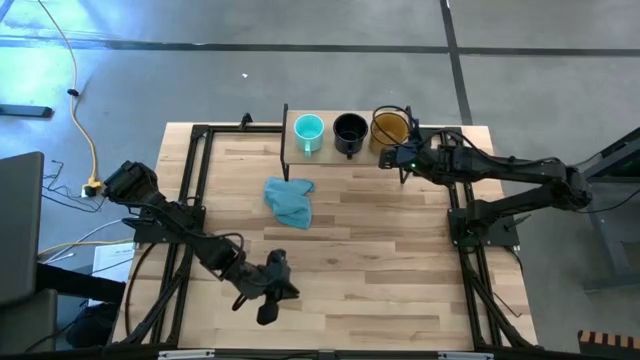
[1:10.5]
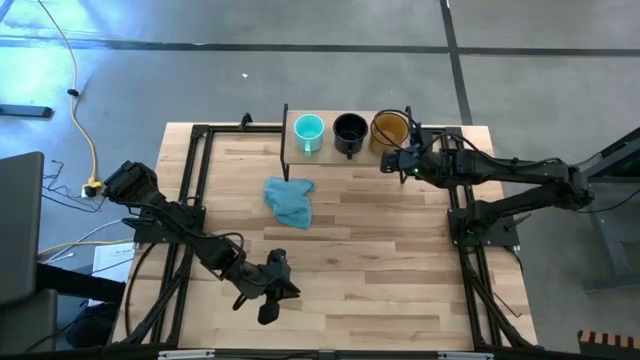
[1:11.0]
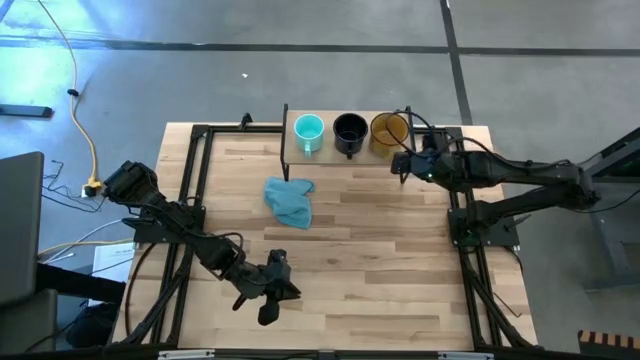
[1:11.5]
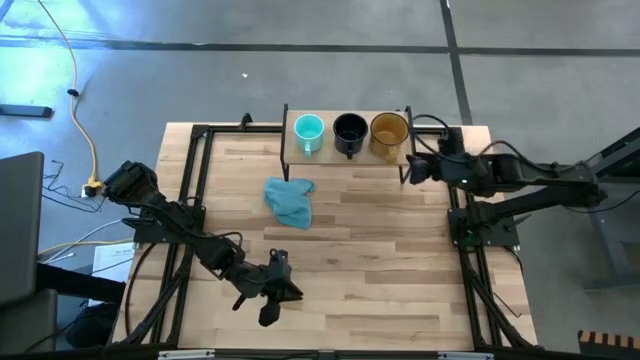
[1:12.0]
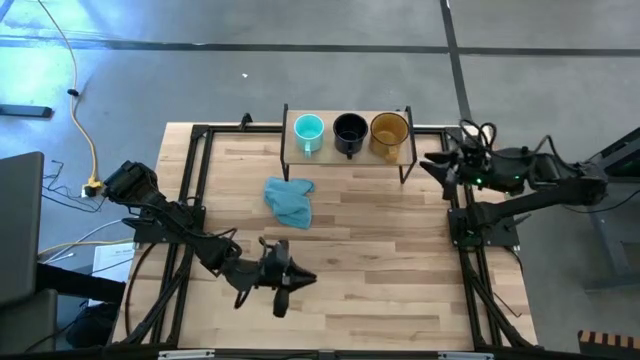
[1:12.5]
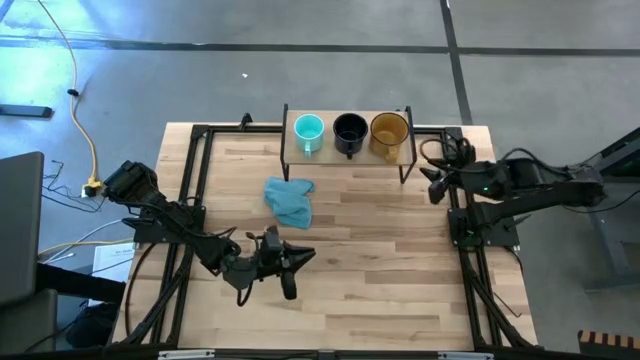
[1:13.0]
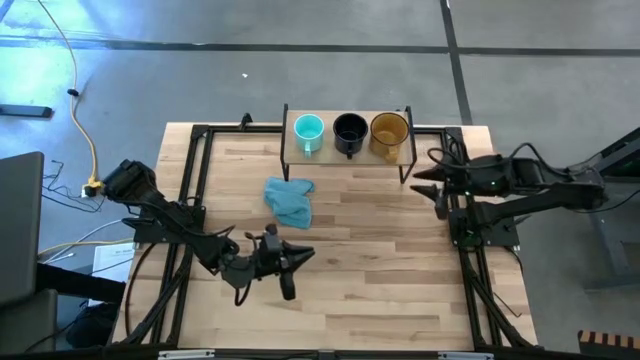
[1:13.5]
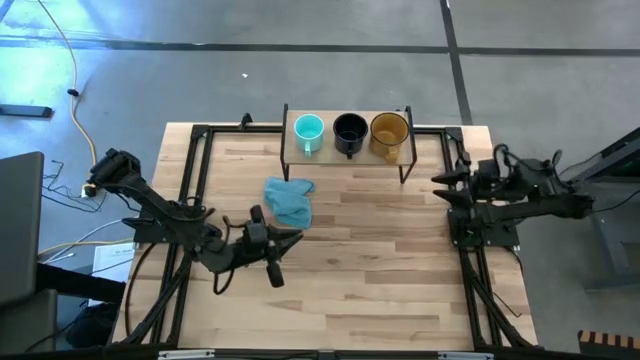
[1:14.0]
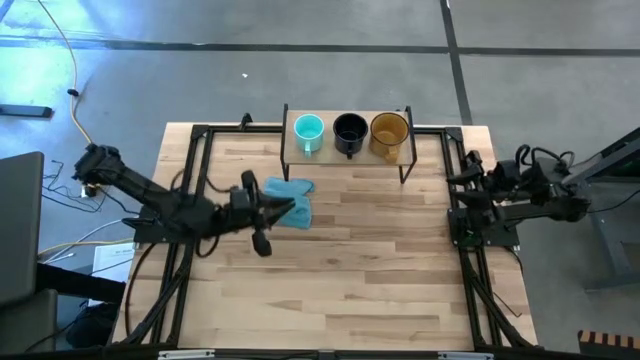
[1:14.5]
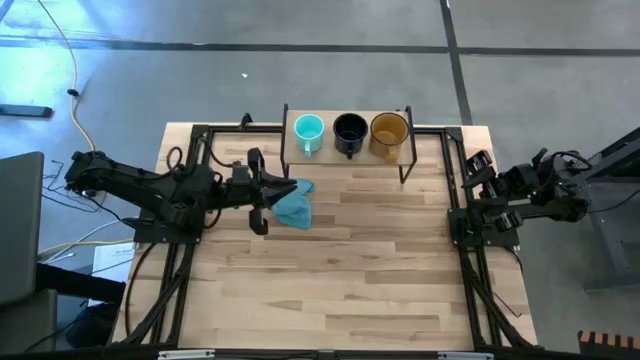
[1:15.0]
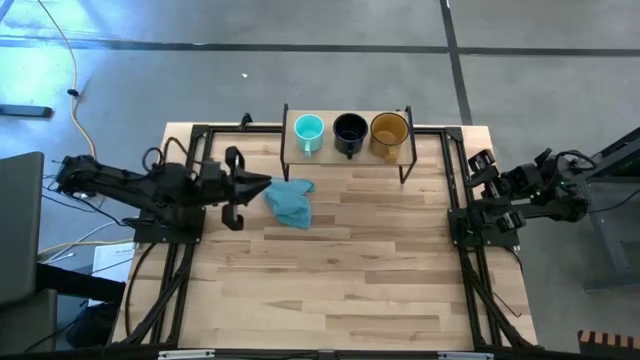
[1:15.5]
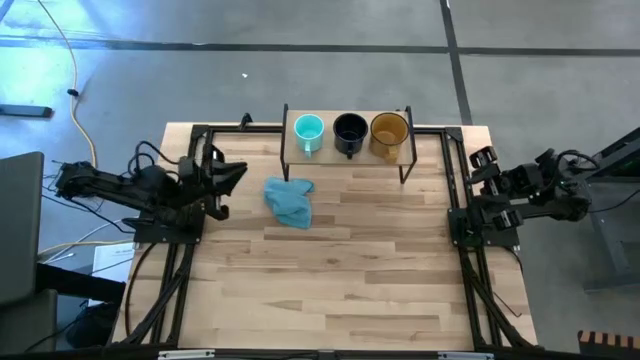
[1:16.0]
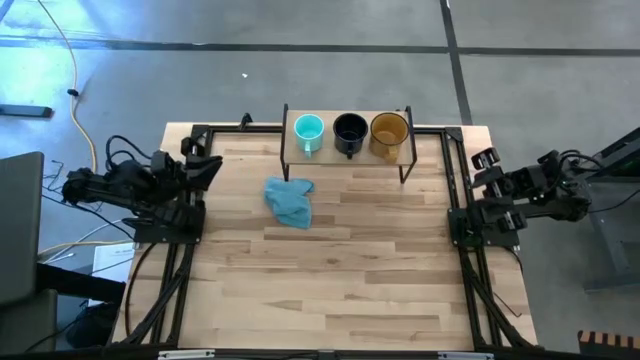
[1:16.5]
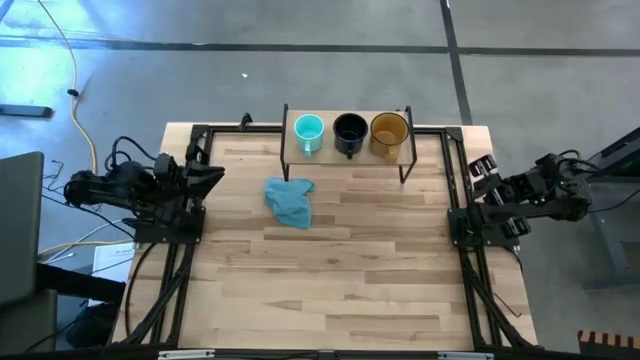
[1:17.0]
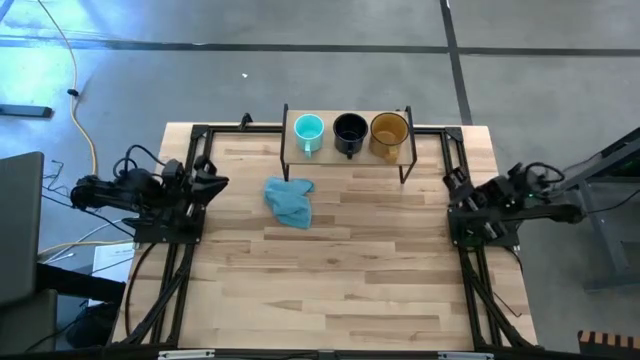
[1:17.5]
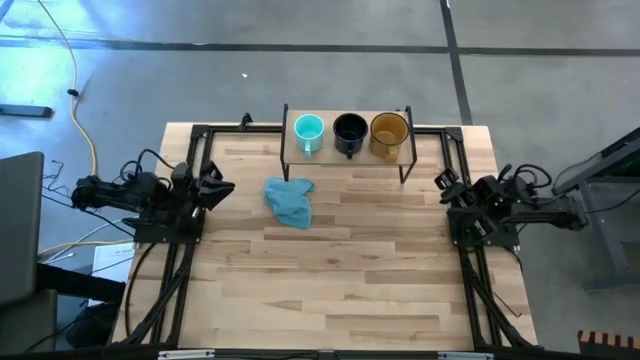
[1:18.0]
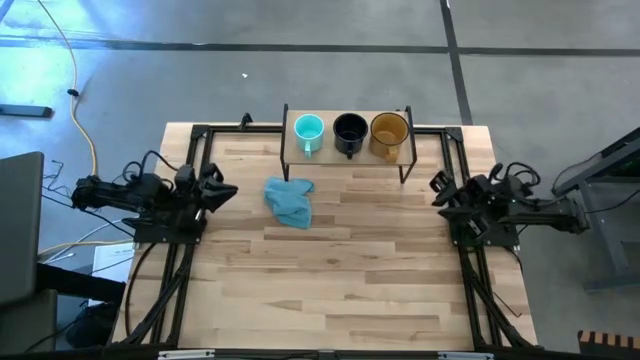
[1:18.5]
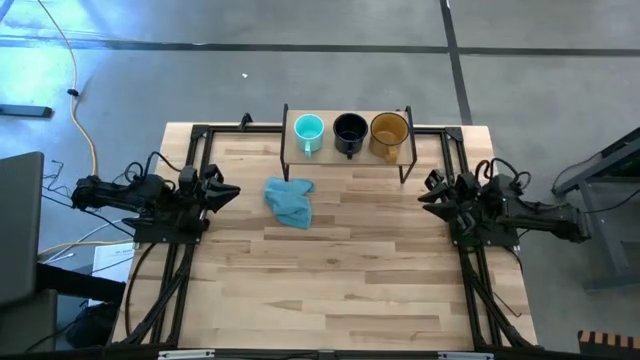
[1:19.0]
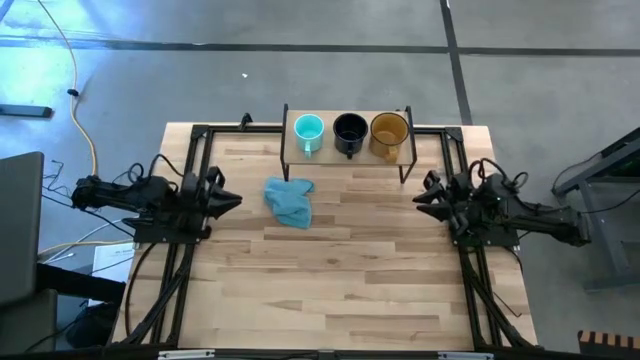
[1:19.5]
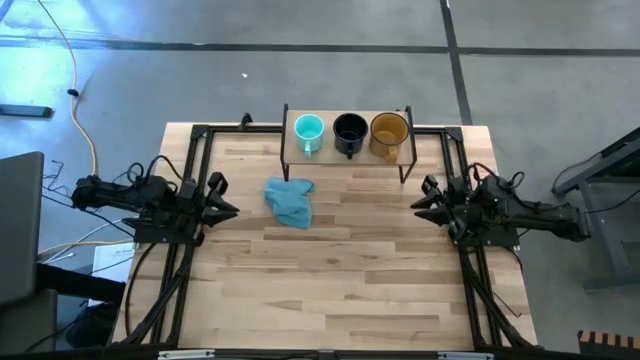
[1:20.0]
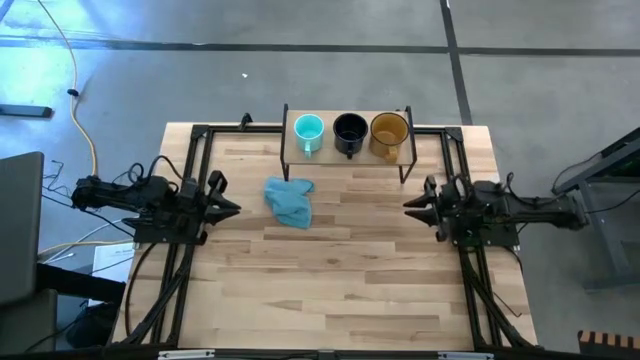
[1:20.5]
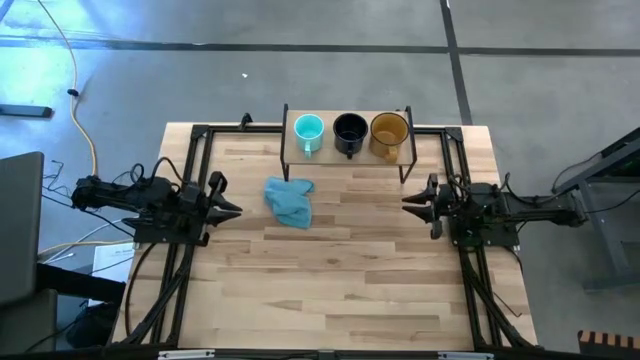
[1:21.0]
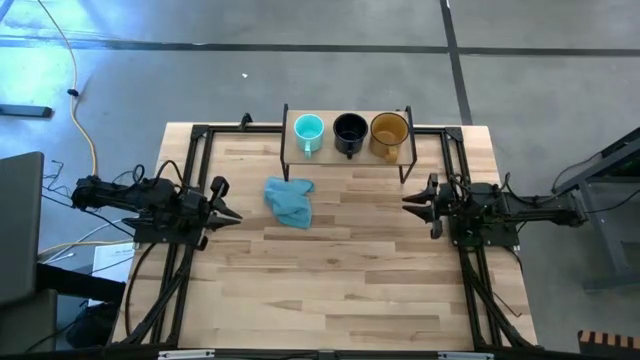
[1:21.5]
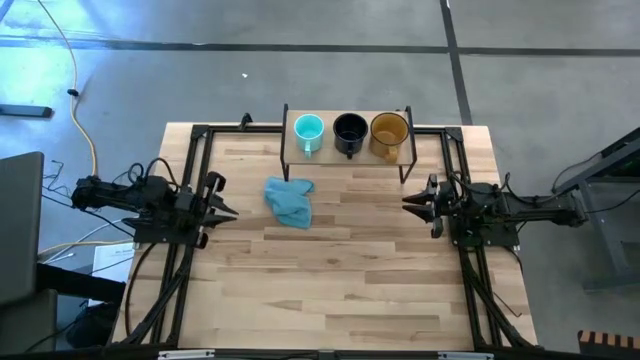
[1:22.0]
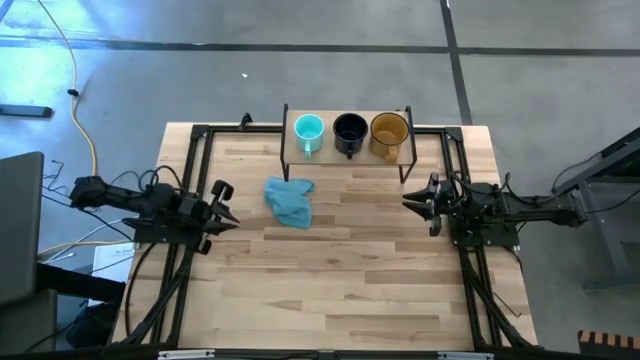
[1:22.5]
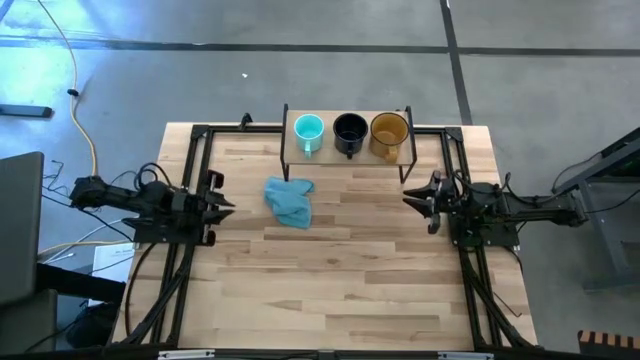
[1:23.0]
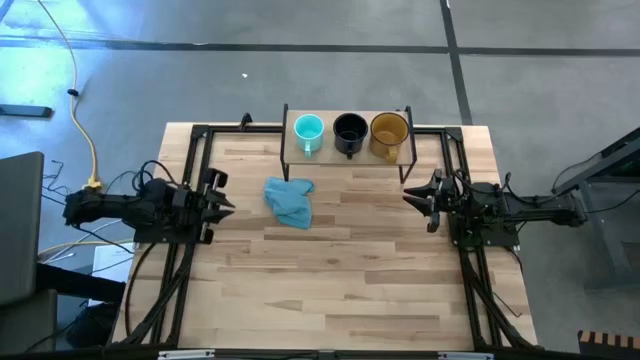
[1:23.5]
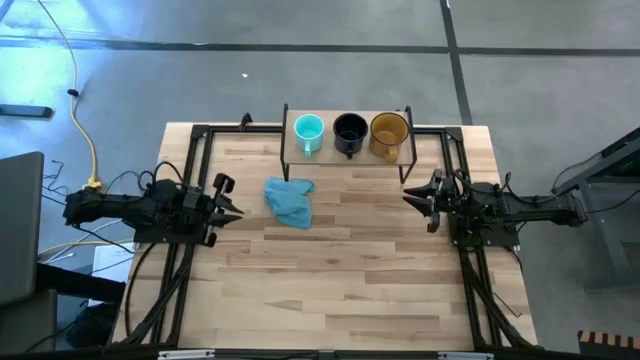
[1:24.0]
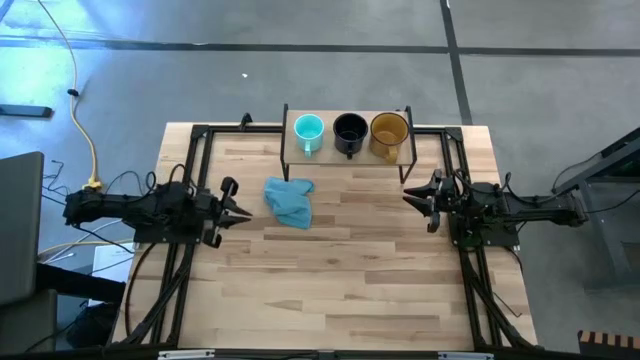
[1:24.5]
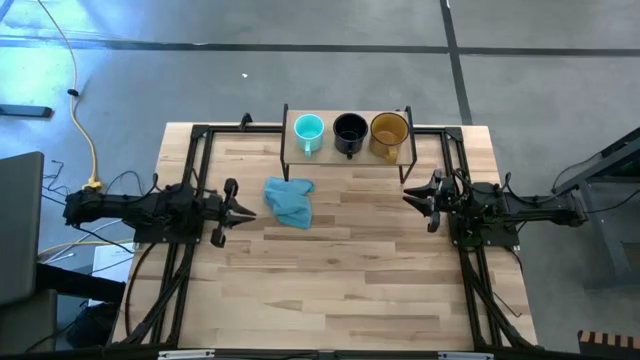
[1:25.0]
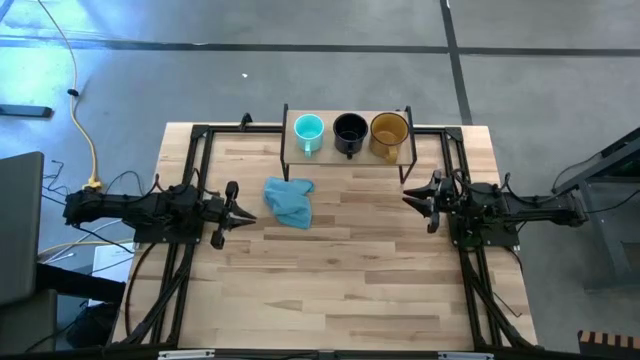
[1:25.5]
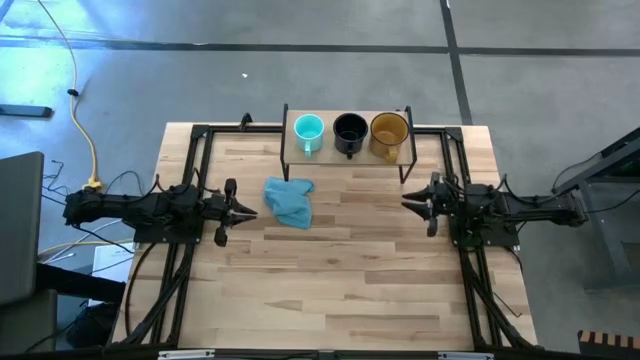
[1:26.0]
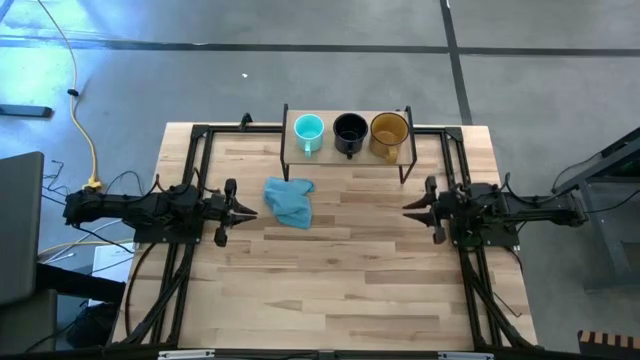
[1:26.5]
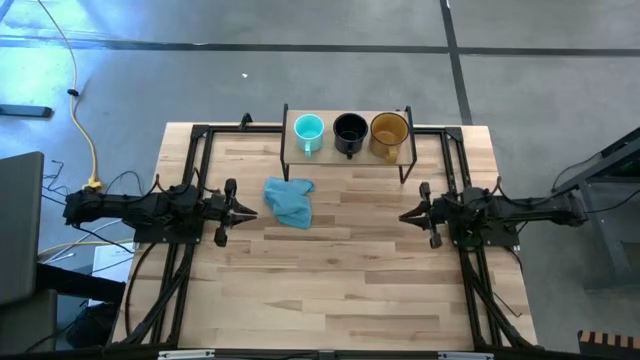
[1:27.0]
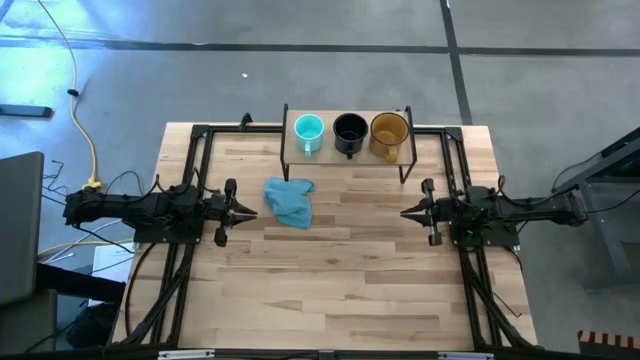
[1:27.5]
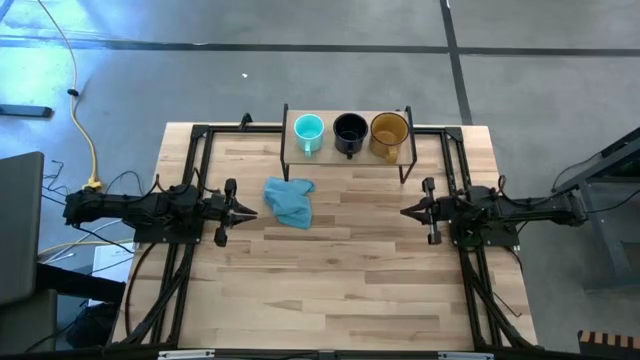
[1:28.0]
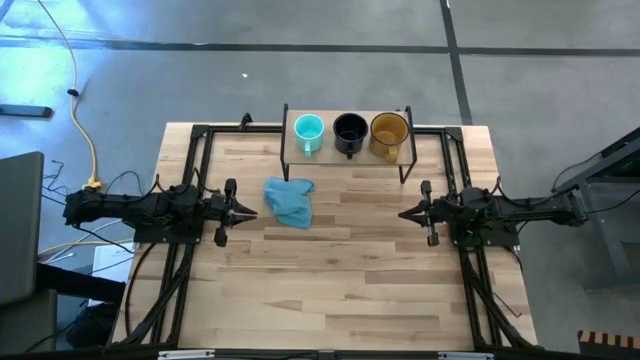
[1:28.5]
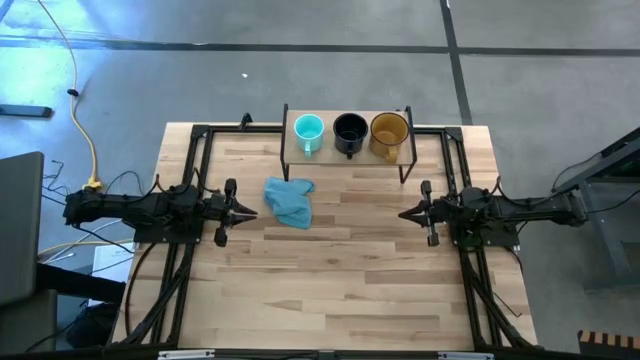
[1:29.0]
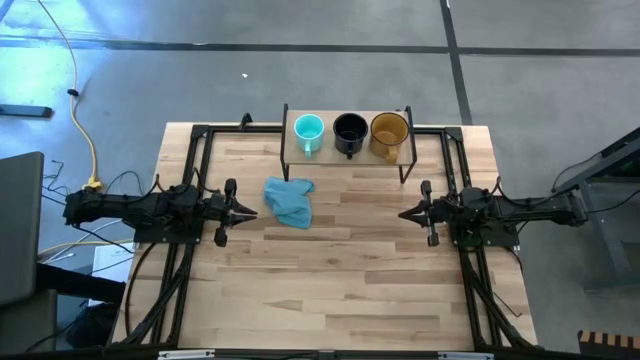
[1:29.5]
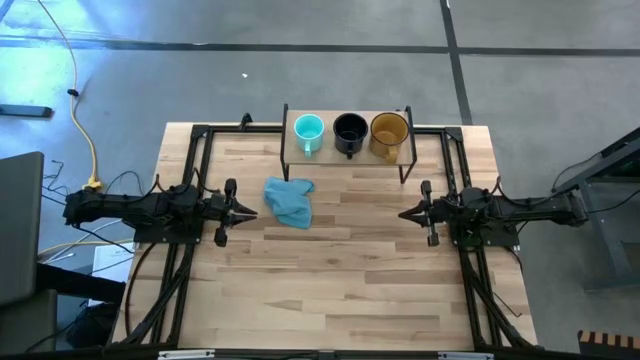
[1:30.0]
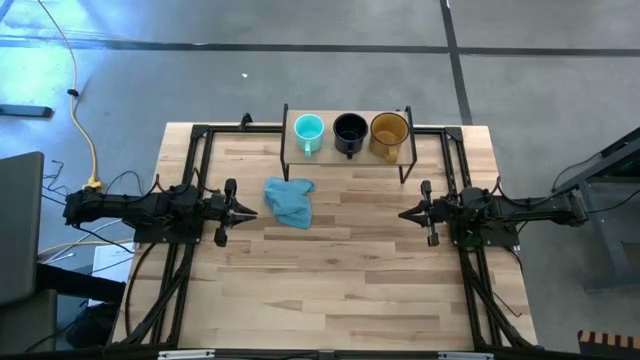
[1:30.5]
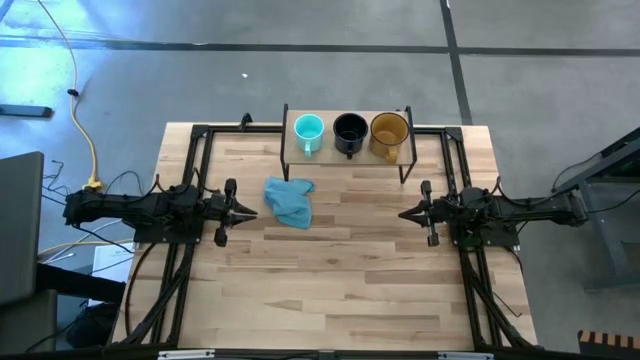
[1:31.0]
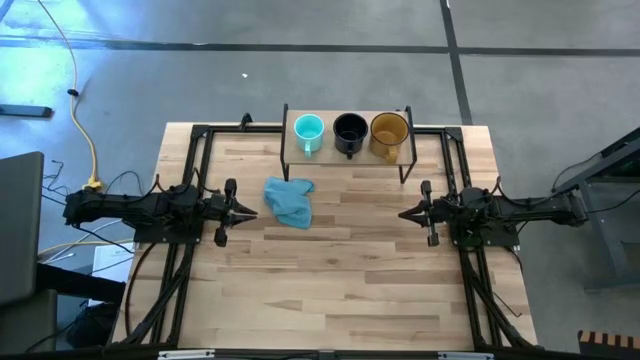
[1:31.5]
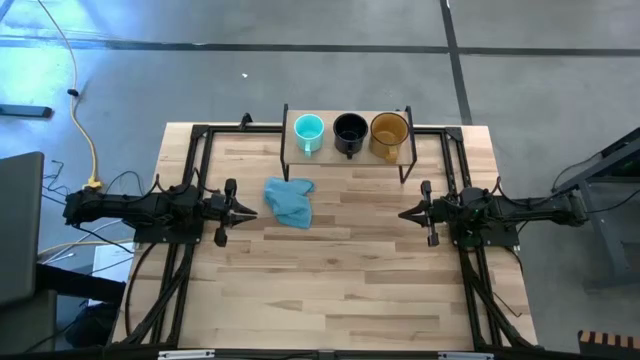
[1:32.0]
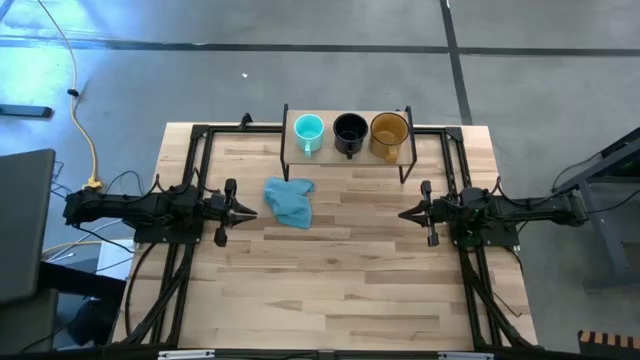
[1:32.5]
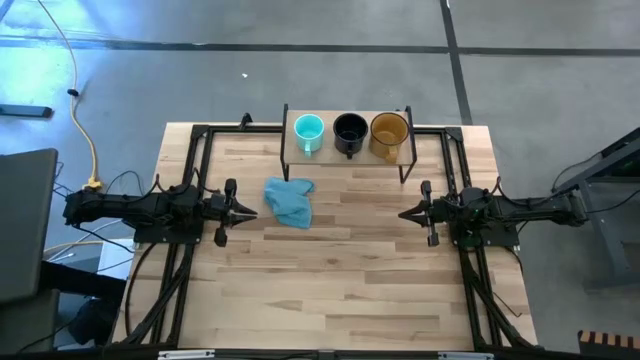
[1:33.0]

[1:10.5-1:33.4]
Task: Stack small to large cups/mugs on shelf
Return to Home Position
